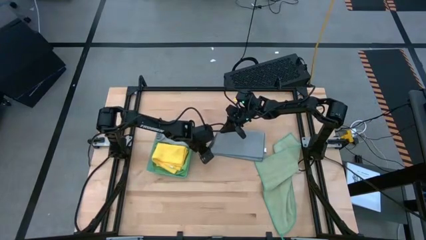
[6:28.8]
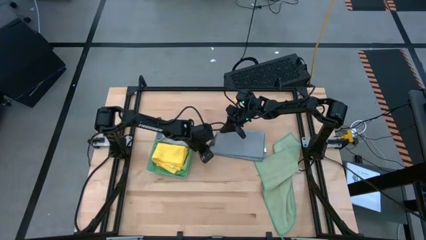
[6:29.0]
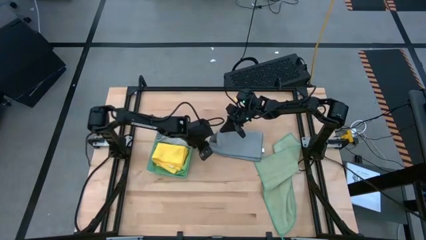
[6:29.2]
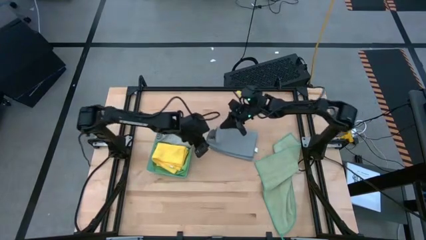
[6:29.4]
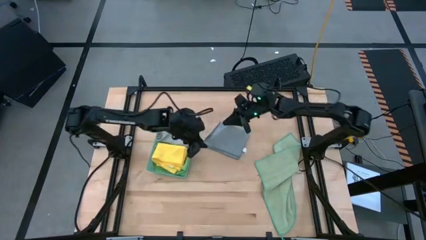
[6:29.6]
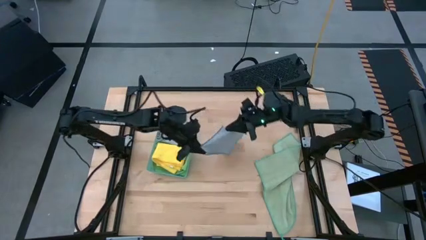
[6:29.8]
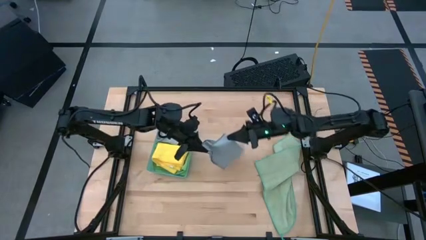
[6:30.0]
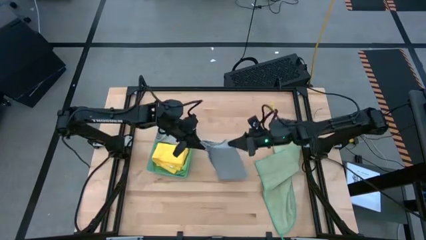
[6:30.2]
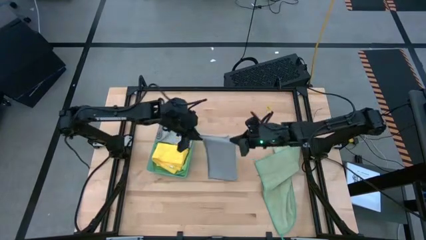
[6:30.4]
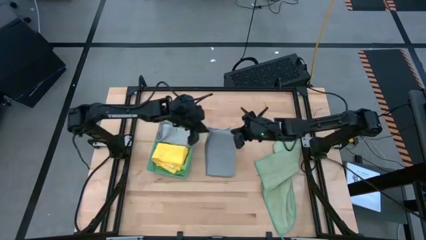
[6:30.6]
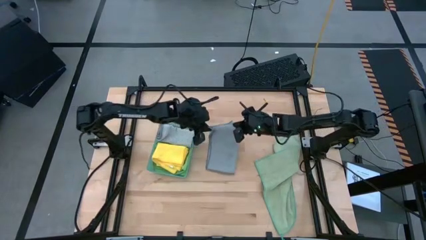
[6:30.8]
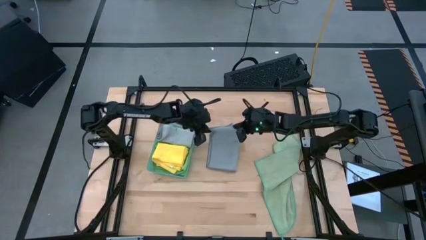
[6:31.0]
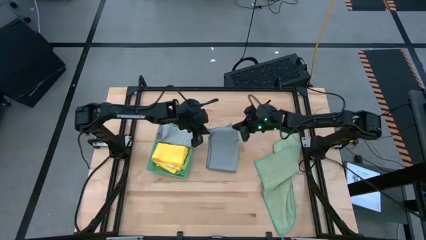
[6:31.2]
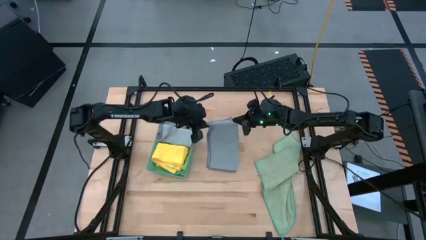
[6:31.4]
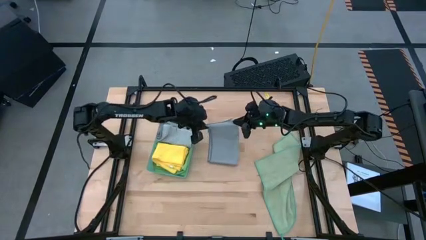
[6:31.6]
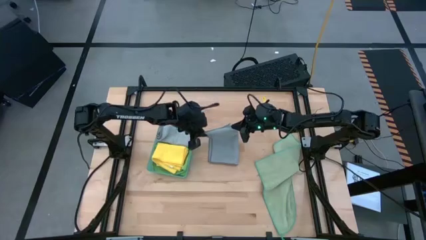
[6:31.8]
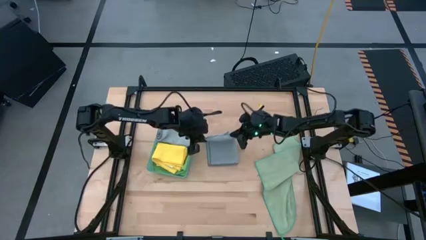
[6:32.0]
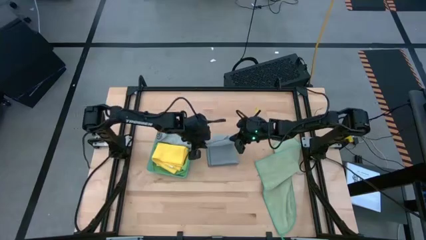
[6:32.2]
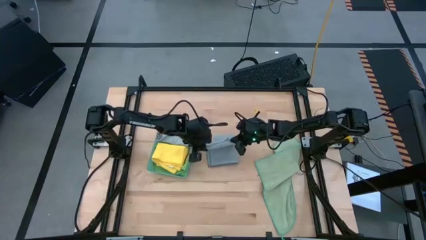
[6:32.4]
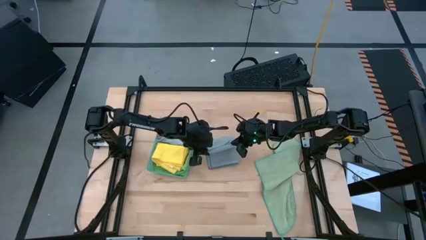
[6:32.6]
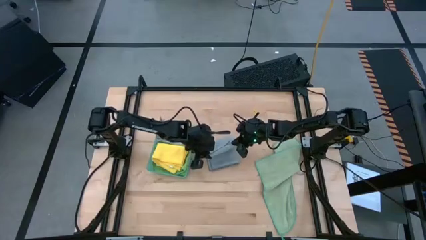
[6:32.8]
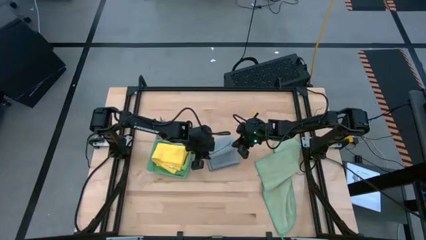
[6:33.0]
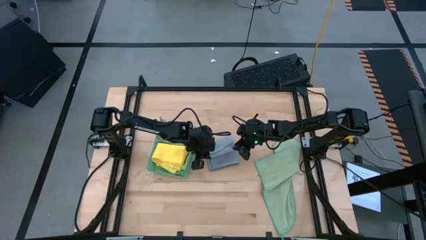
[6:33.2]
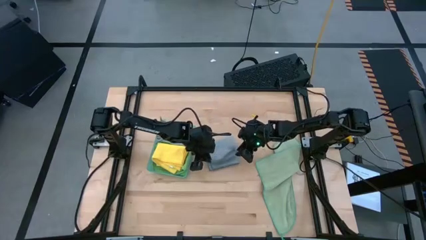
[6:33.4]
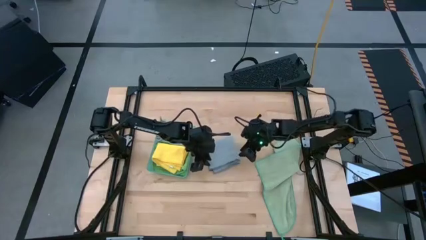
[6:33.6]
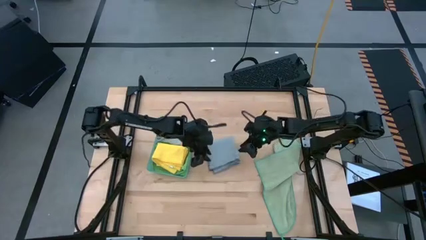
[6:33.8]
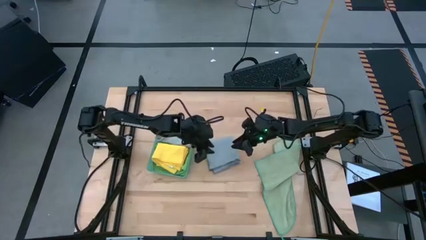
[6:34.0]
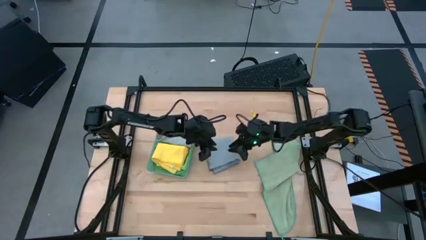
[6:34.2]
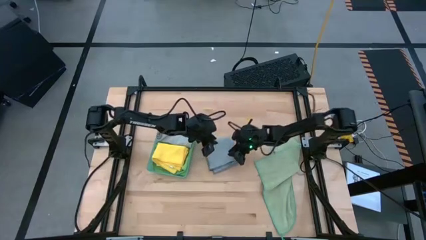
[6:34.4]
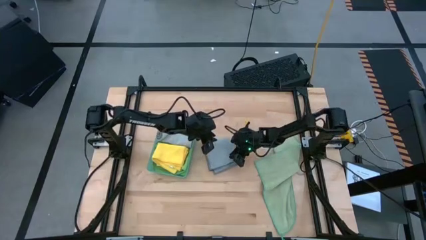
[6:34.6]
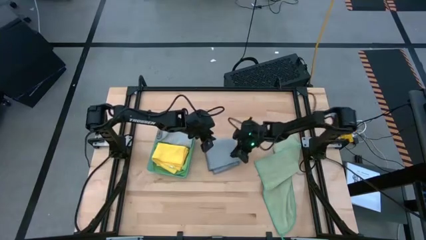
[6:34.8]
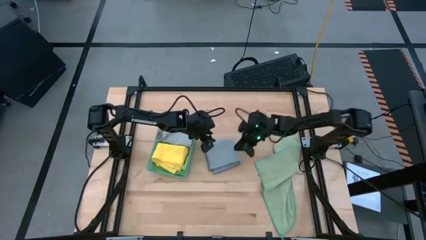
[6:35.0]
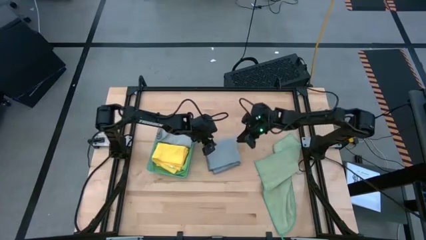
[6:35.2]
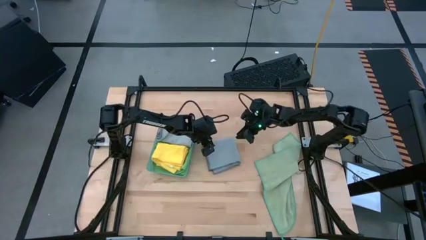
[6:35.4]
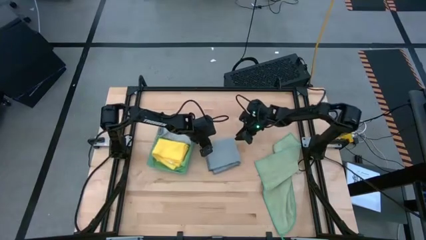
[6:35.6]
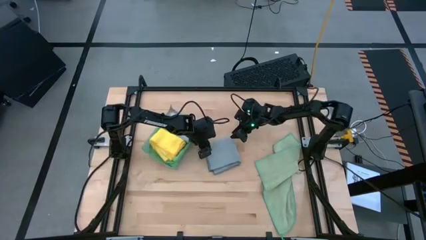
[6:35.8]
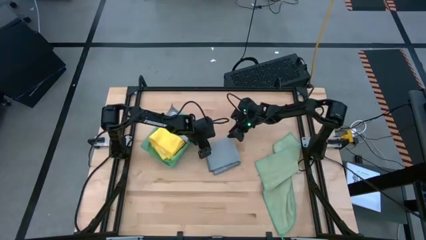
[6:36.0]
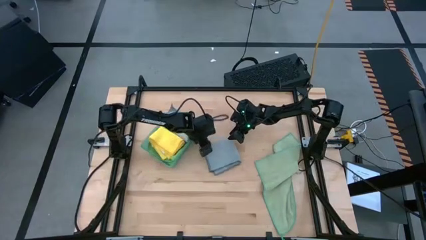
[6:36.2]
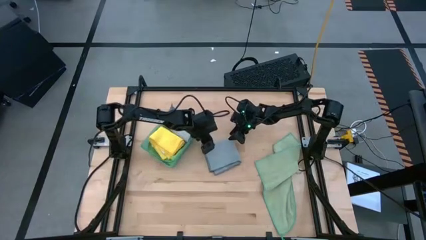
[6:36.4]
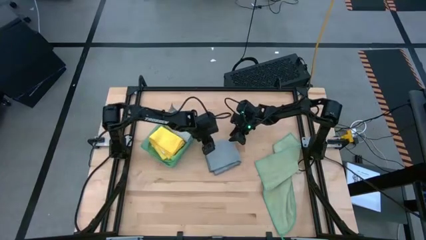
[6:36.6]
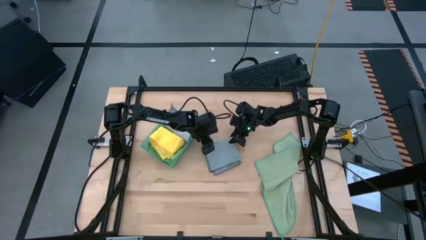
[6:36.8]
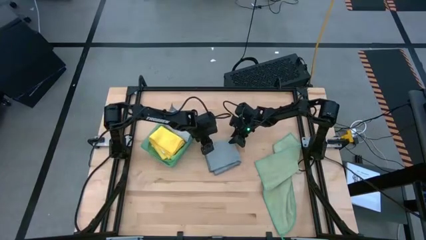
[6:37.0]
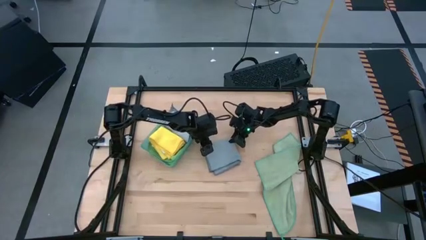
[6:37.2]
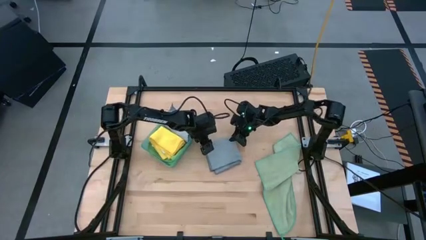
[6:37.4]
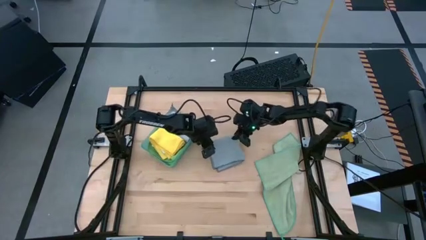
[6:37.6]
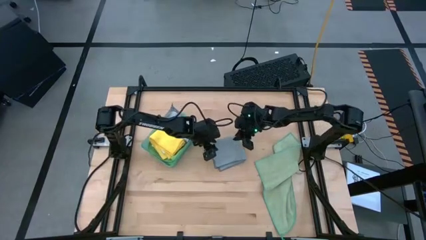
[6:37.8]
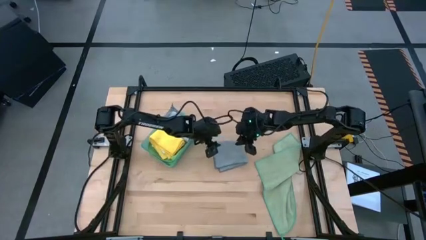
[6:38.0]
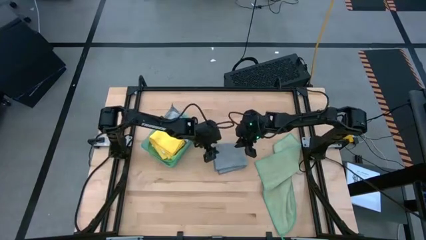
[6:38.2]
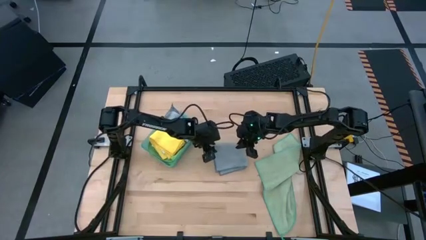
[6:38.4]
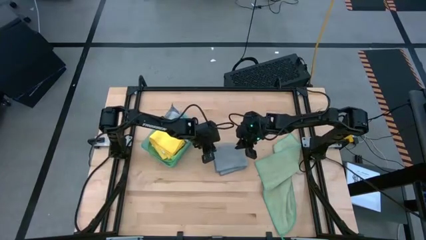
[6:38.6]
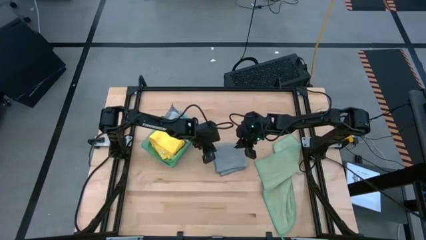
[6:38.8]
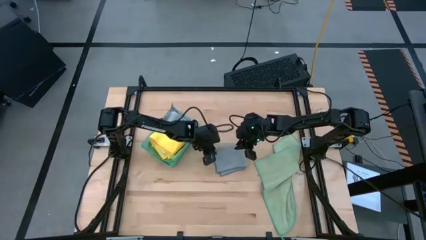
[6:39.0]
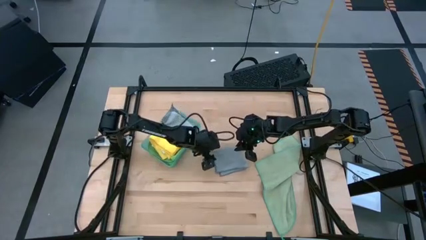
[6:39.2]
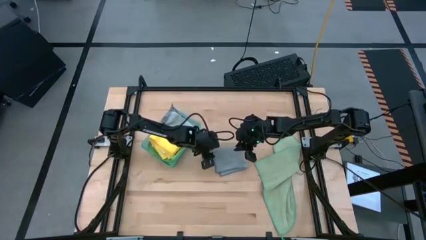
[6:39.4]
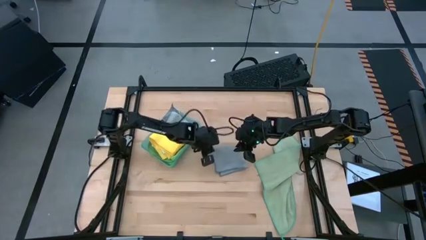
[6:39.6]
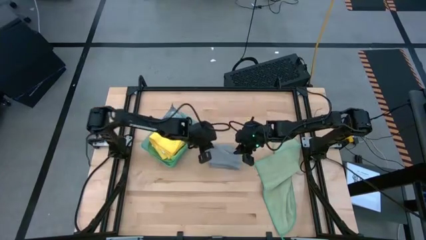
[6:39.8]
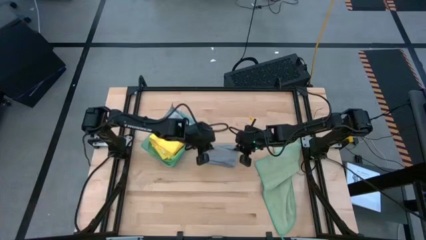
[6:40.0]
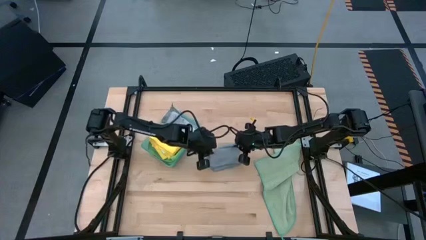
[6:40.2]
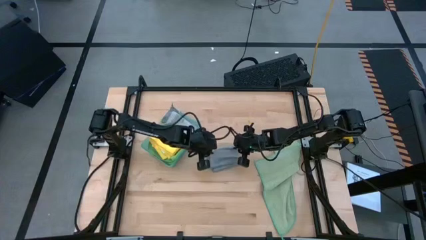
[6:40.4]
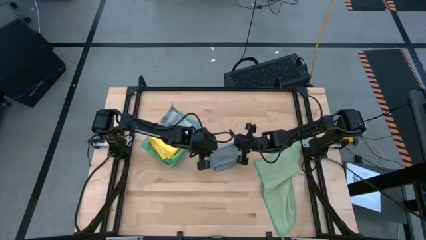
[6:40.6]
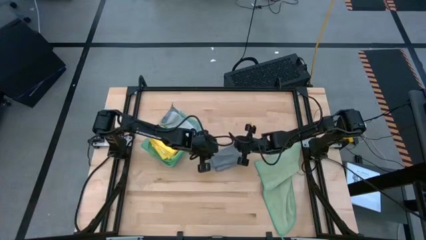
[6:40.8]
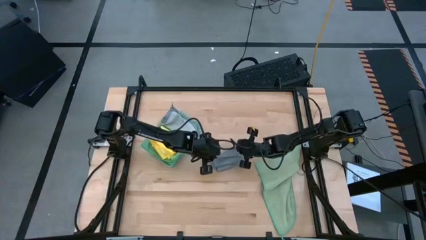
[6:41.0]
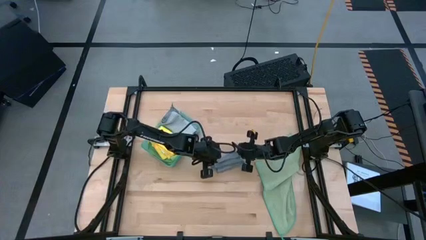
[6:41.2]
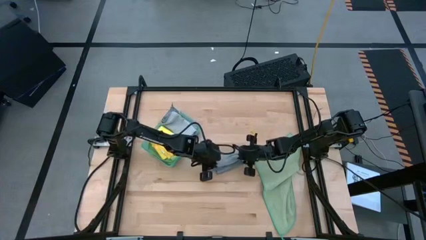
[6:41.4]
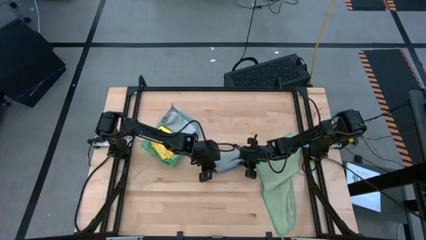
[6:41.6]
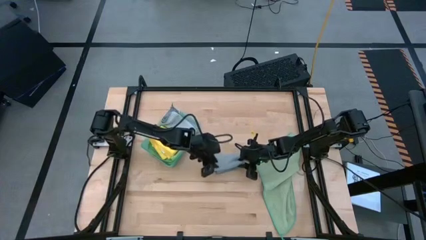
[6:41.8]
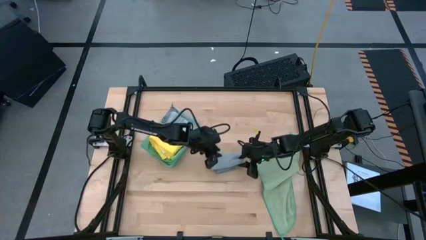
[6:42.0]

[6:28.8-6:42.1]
Task: Fold microfiber towels
Fold the gray microfiber cloth

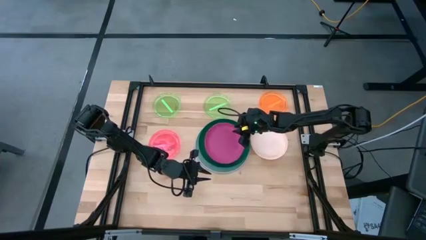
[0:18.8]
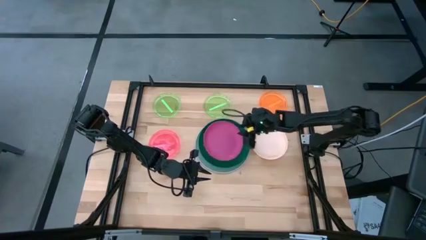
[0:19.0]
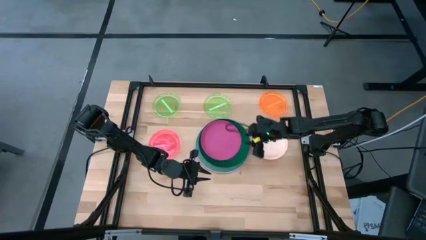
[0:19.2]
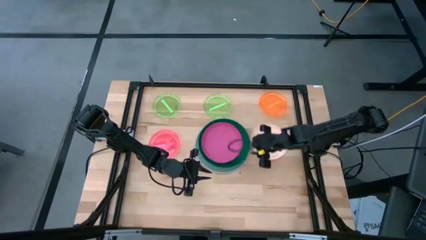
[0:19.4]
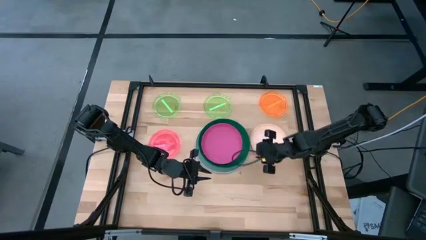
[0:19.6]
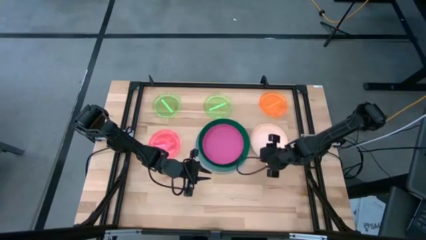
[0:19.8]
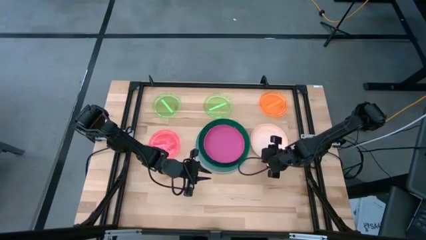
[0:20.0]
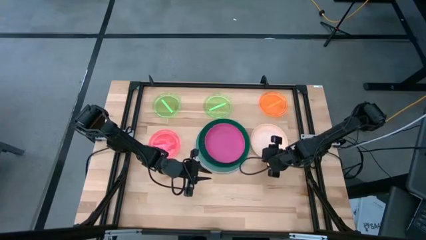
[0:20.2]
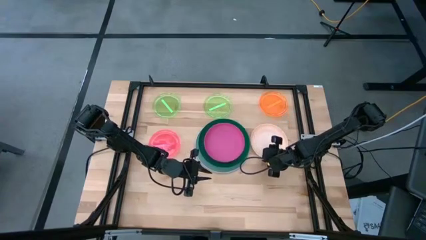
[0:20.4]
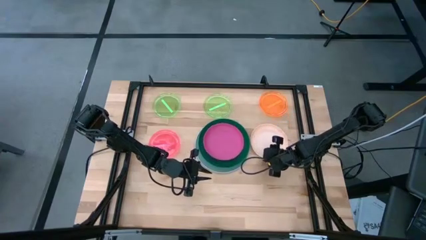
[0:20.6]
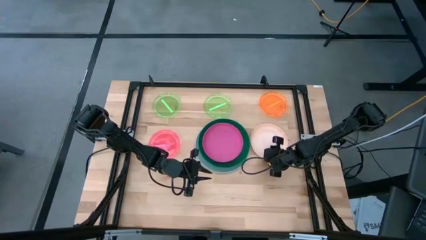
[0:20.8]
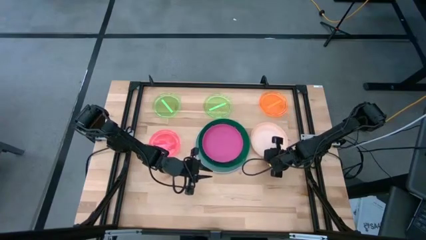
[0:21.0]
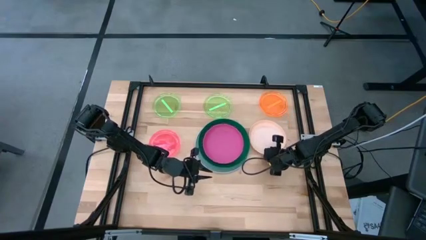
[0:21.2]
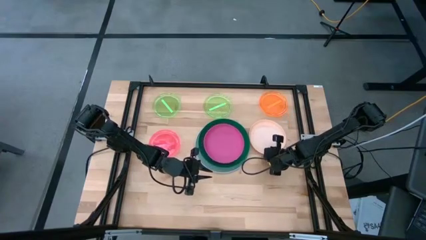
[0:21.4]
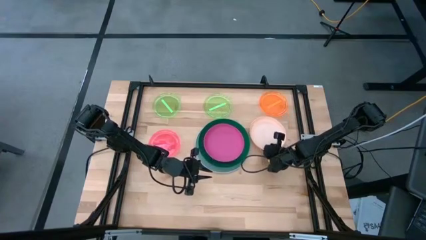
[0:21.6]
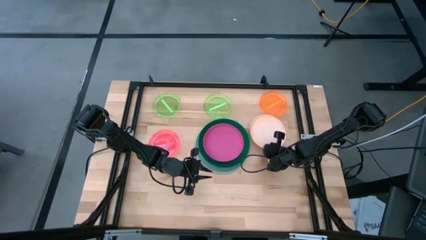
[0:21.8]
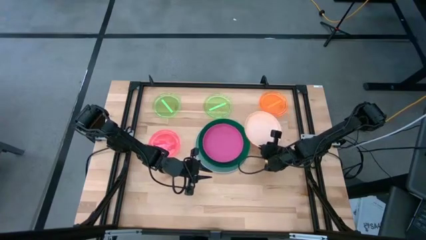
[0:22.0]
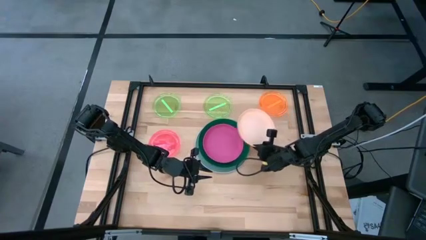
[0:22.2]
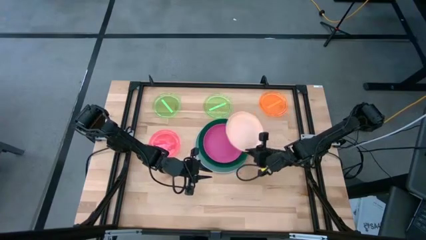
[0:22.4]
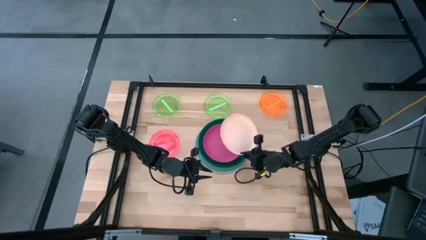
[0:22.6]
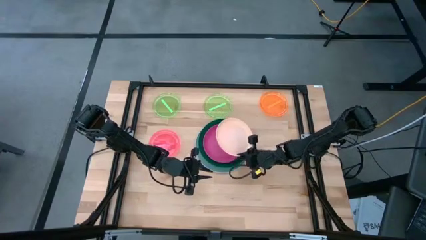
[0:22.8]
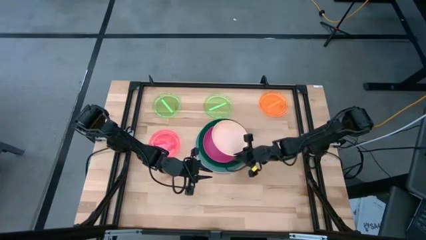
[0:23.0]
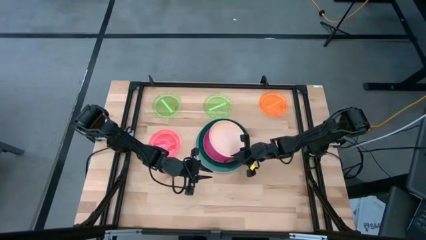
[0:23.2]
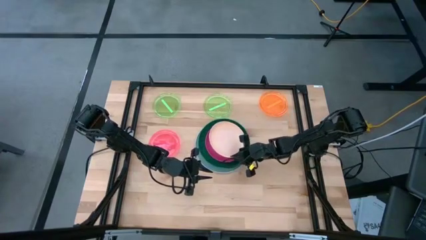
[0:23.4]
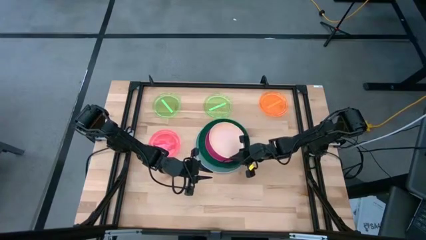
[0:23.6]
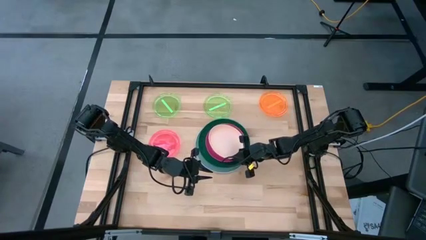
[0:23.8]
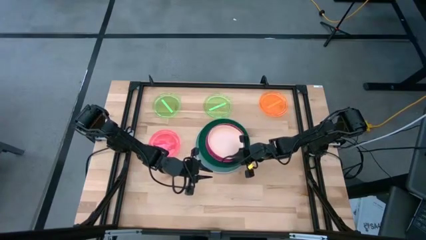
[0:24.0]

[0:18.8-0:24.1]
Task: Stack plastic plates
Stack the white plate on top of pink plate
